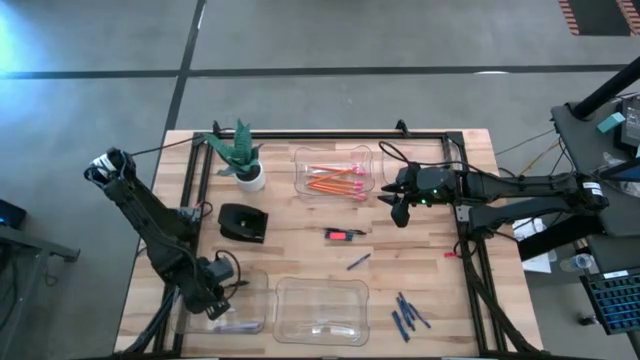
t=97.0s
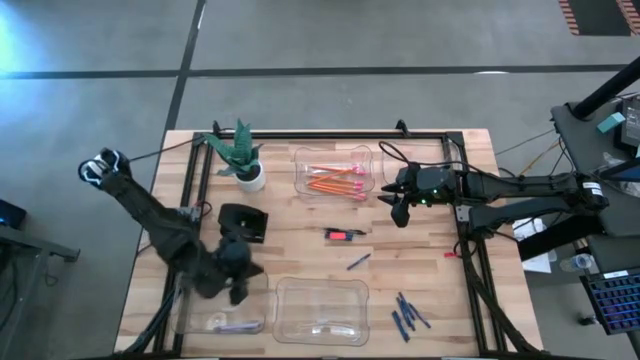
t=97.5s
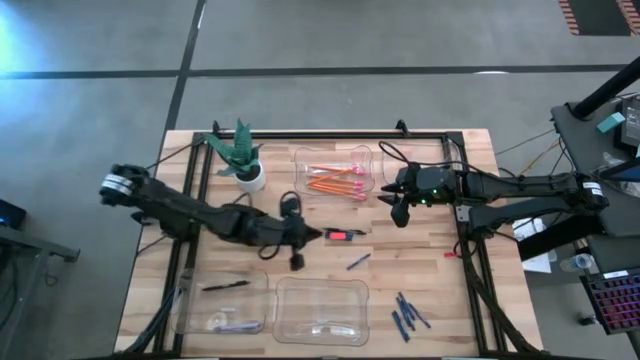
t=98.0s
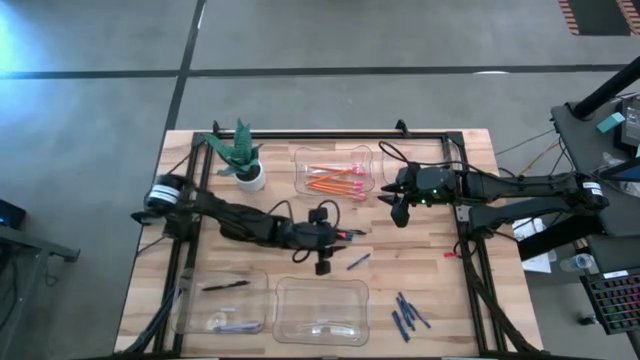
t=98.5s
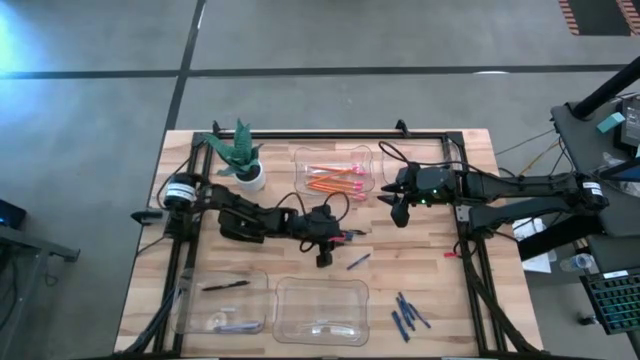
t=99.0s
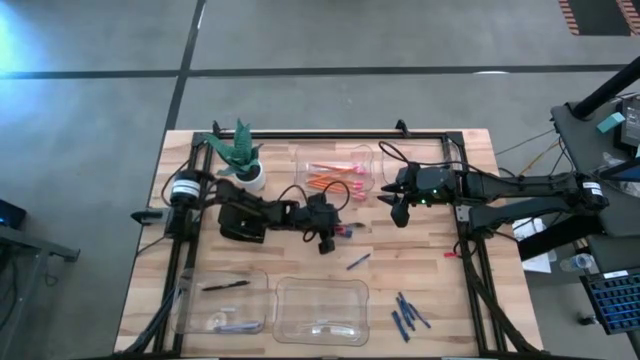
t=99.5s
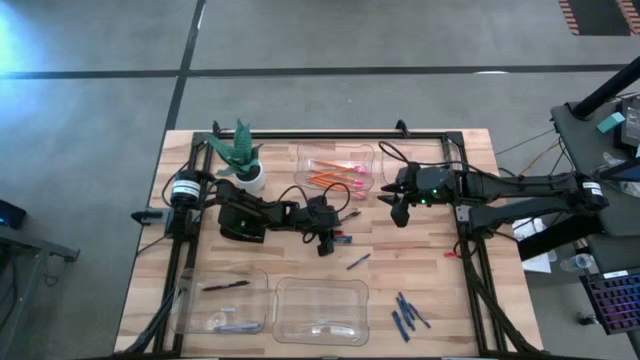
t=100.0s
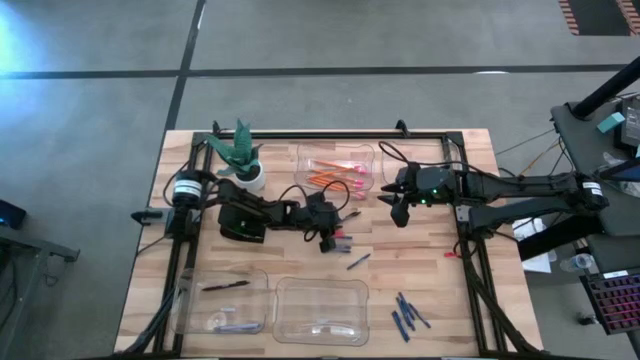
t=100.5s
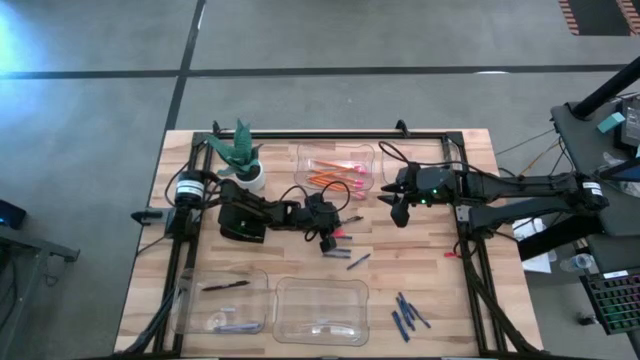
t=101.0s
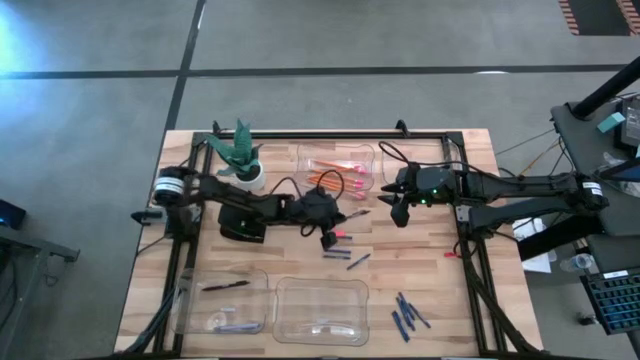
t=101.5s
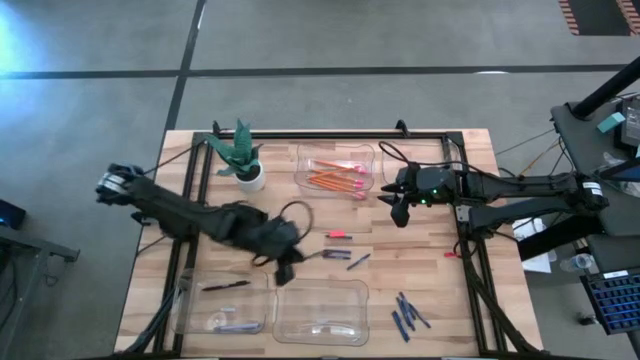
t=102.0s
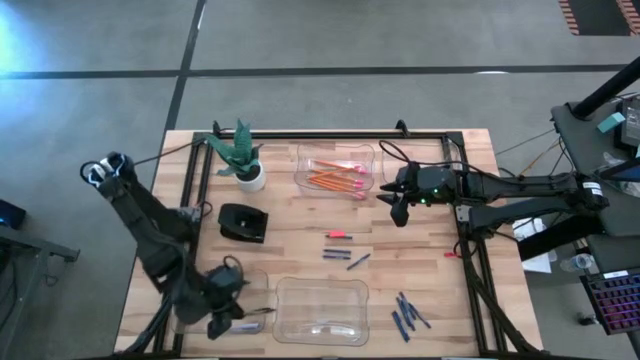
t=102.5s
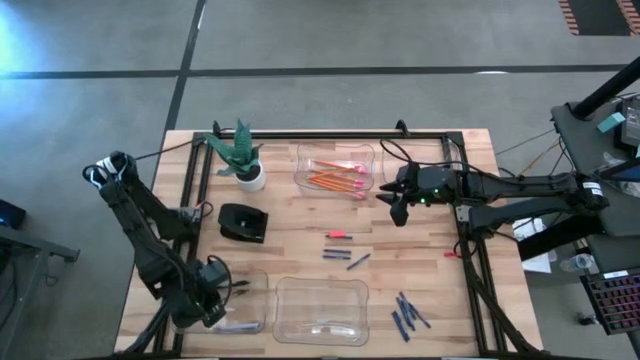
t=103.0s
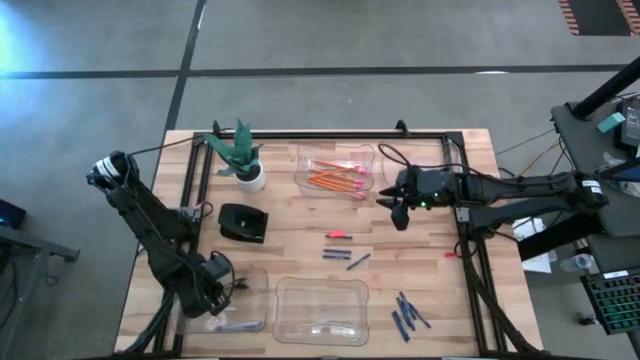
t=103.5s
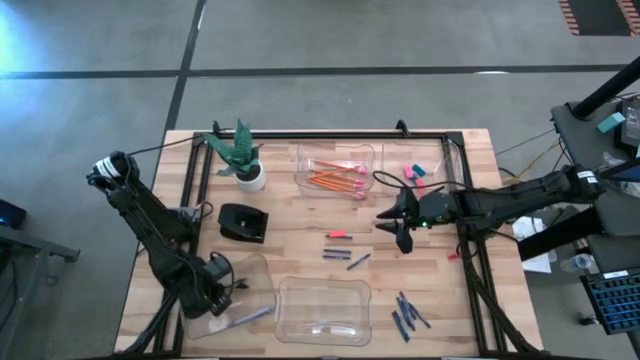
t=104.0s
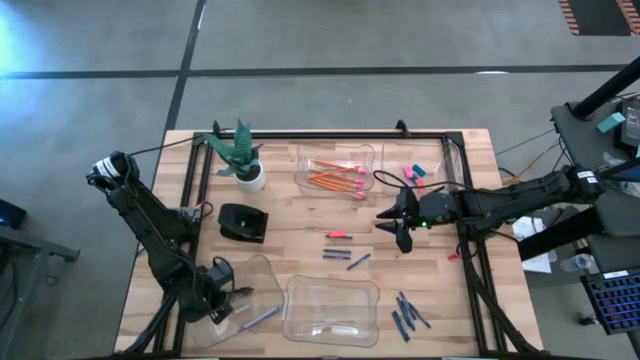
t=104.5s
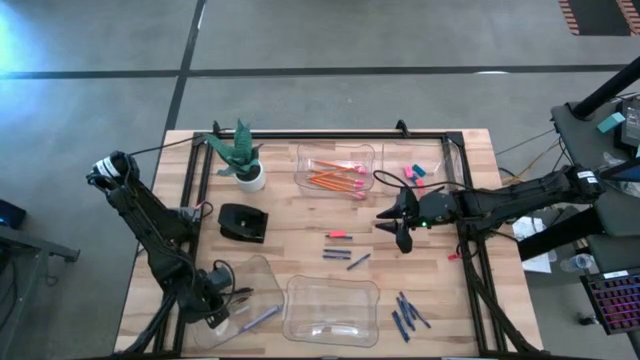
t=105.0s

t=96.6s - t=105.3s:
Task: Sort crayons/erasers/pens/pencils in bins
Put the black pen into the bottom left transparent bin

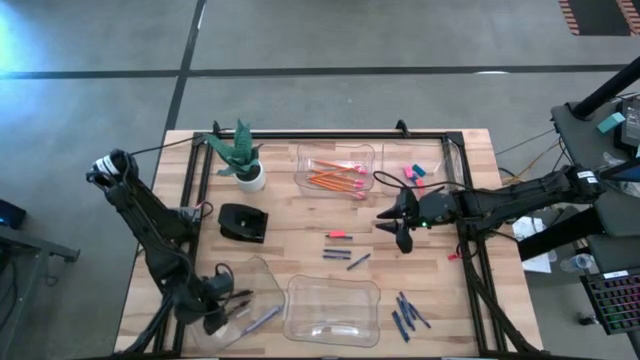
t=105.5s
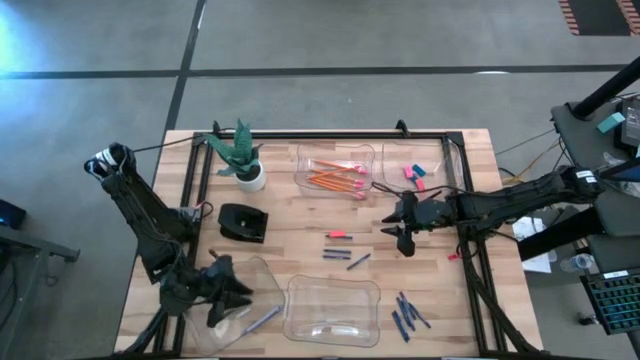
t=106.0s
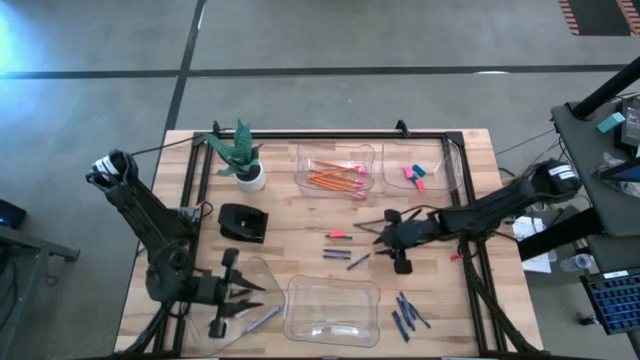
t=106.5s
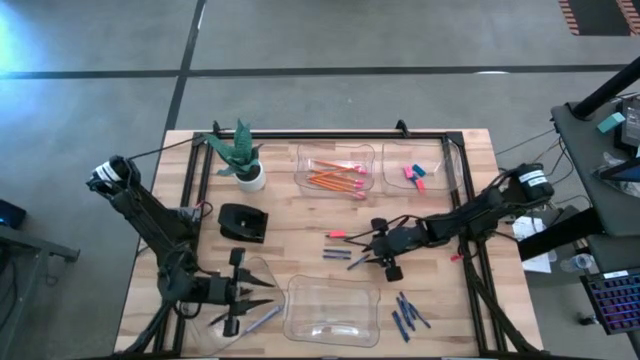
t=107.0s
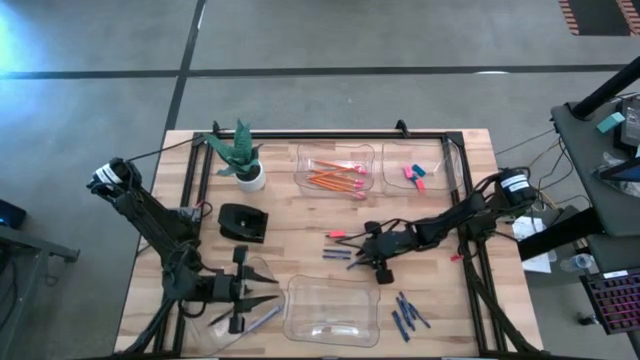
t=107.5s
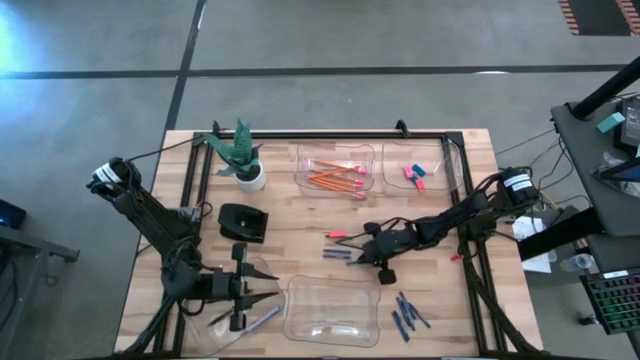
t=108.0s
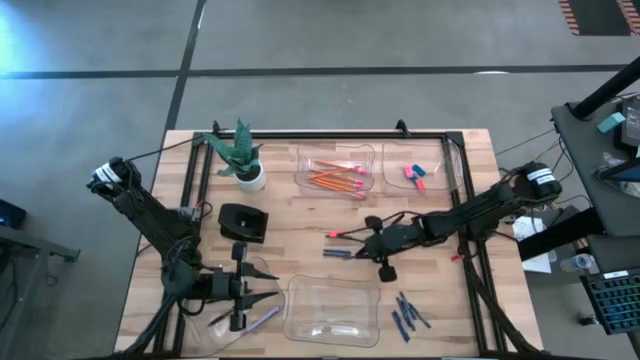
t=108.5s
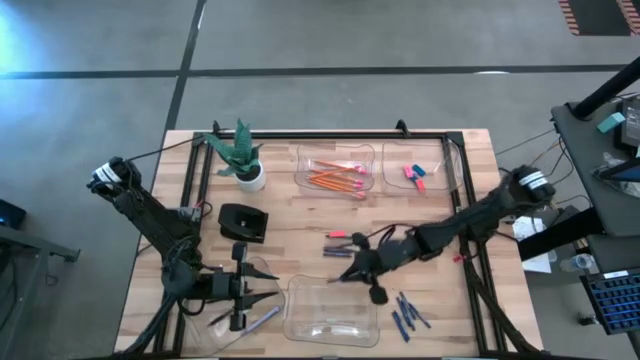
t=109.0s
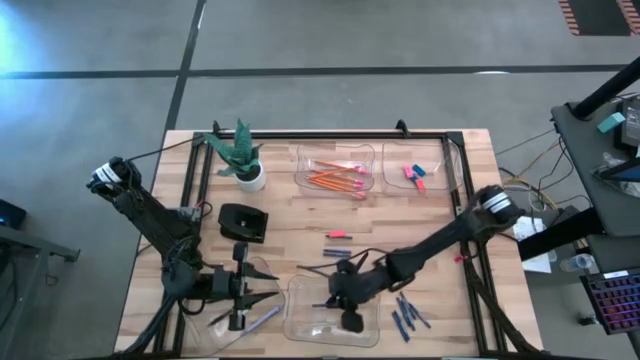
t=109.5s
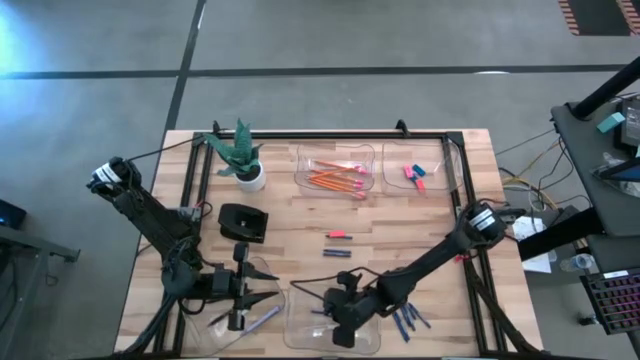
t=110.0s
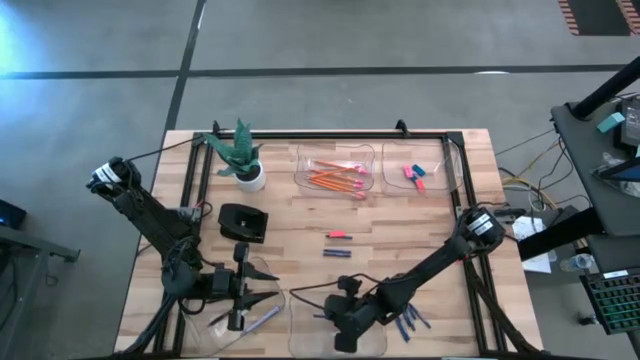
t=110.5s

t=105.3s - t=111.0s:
Put the blue crayon into the bottom right transparent bin

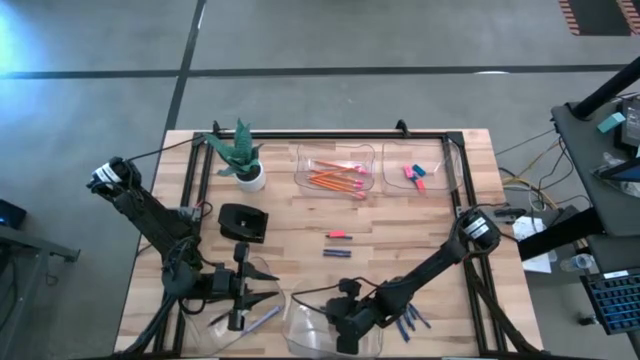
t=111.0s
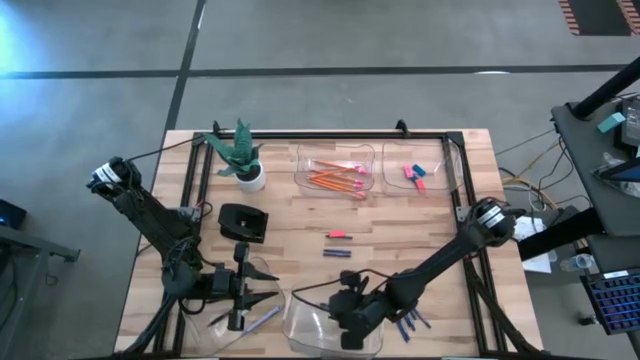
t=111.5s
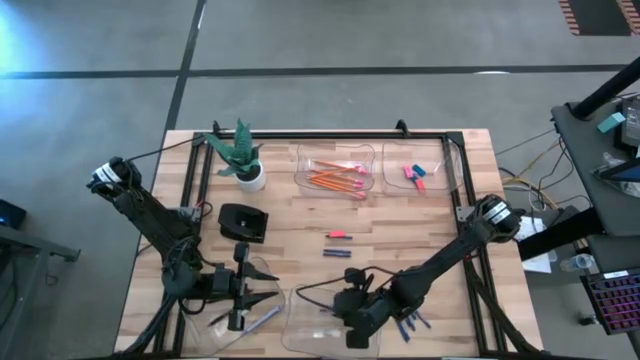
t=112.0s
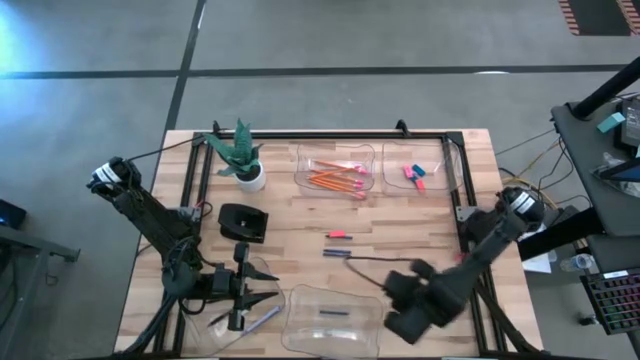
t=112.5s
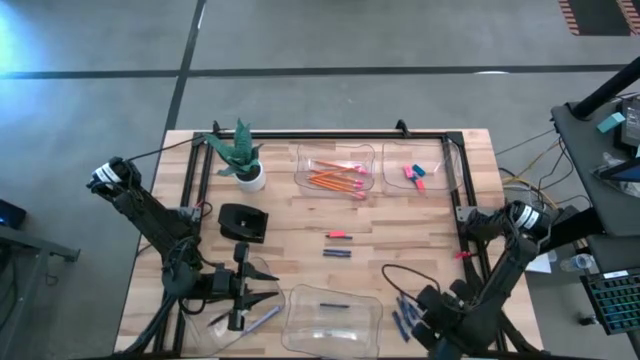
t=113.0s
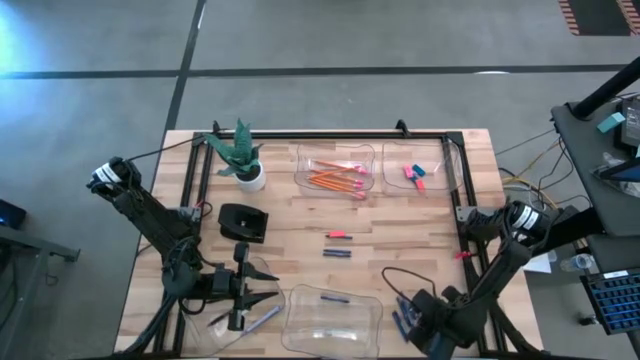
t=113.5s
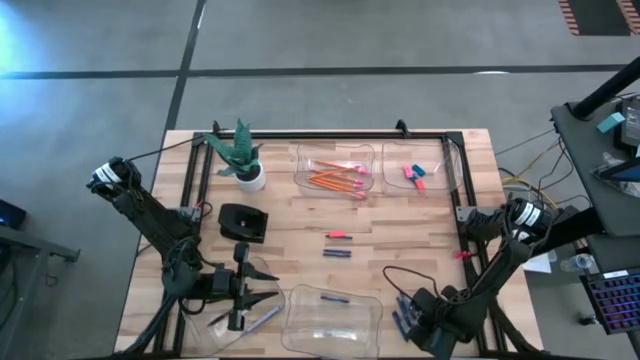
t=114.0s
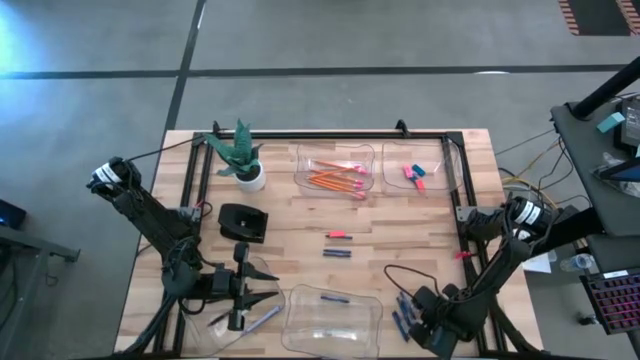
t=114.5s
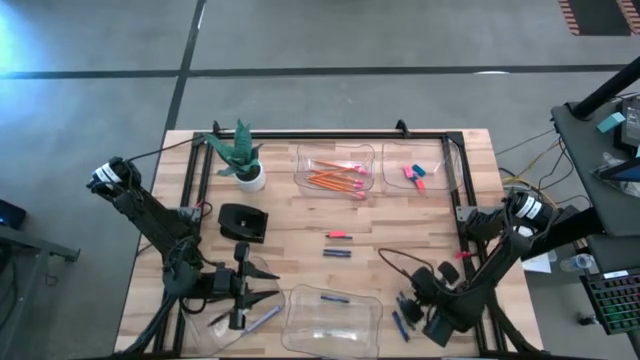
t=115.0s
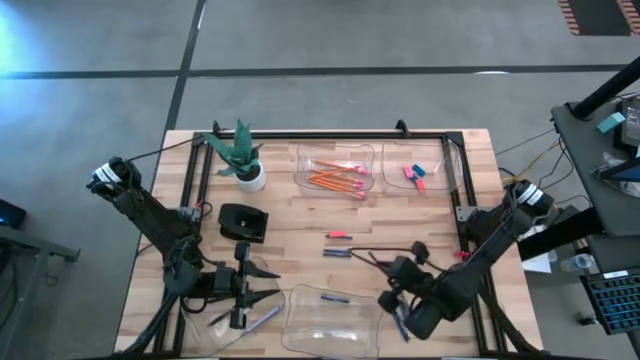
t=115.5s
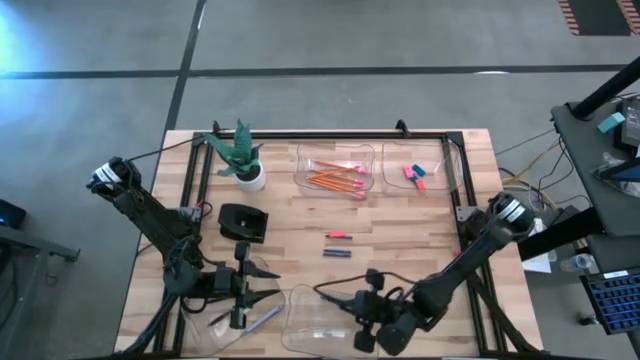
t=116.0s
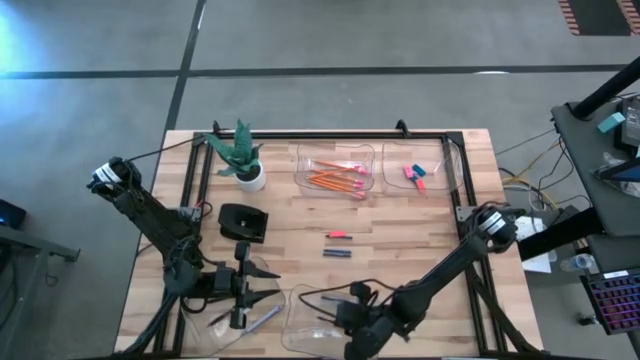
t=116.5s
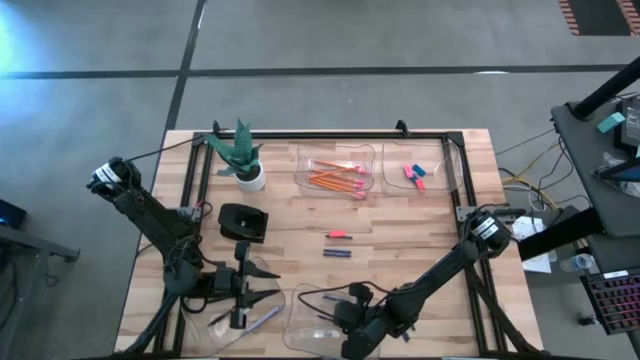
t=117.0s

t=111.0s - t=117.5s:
Put the blue crayon into the bottom right transparent bin

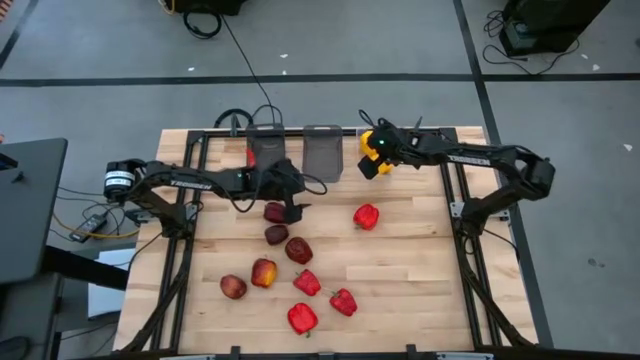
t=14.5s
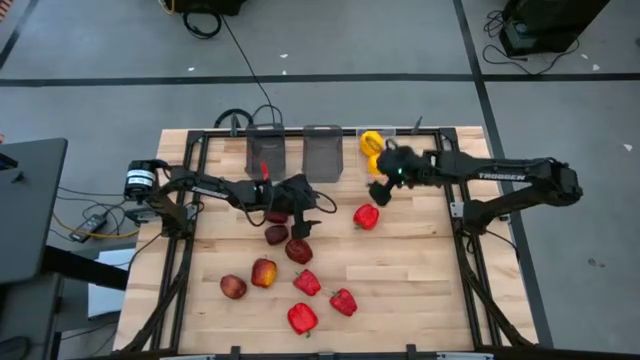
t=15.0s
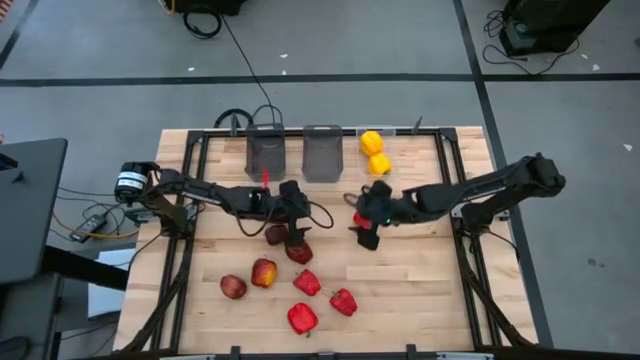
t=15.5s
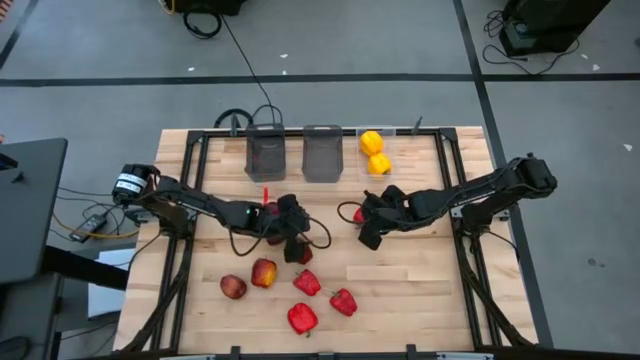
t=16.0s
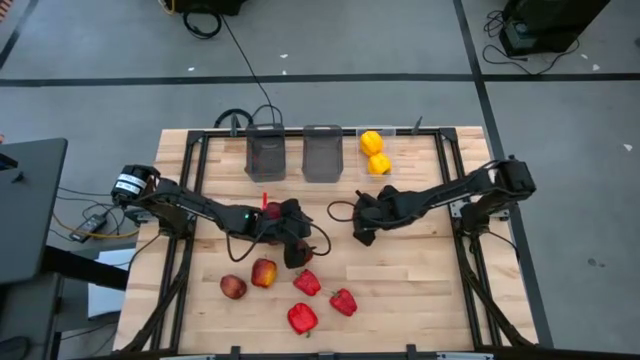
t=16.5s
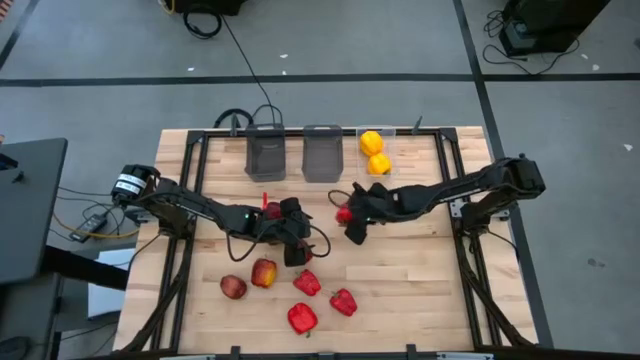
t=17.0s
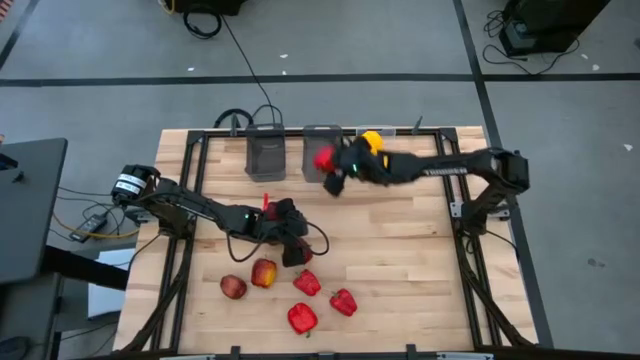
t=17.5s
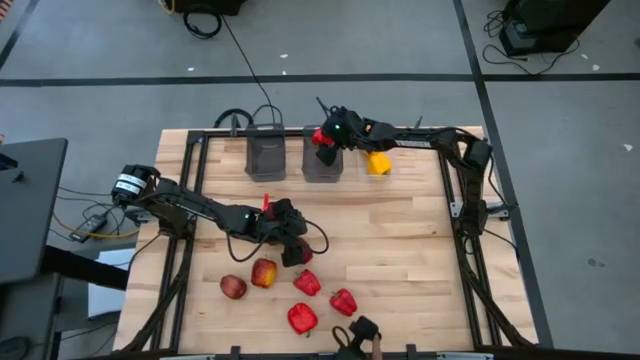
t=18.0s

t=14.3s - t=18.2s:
Task: Sort produce into baskets
Put the red bell pepper into the right black bin
